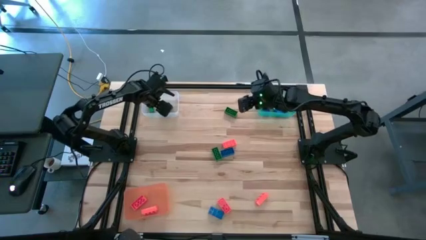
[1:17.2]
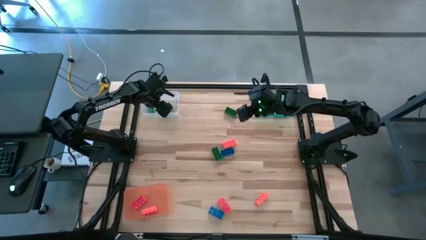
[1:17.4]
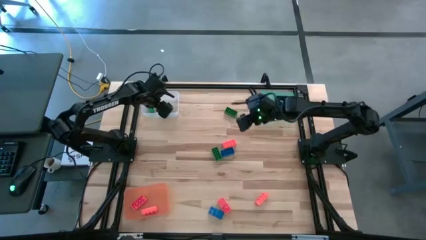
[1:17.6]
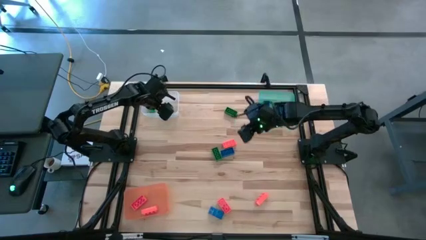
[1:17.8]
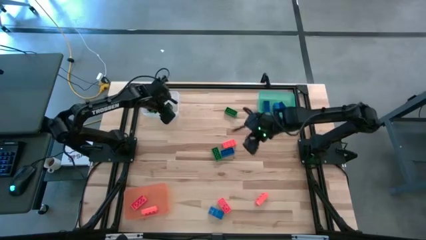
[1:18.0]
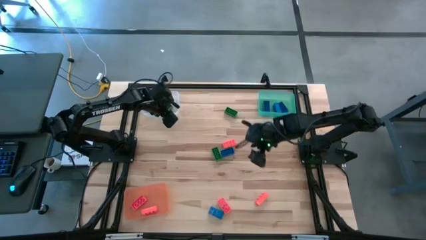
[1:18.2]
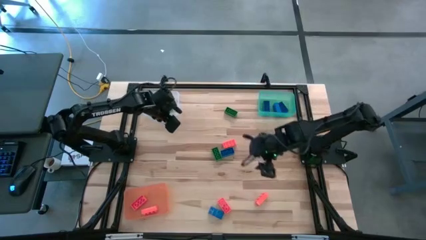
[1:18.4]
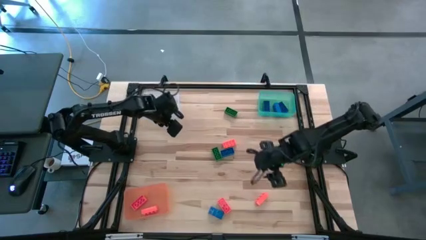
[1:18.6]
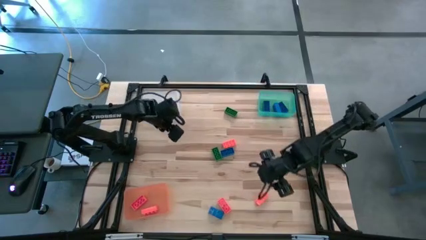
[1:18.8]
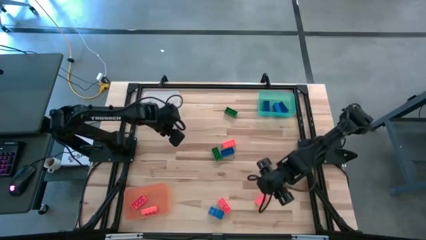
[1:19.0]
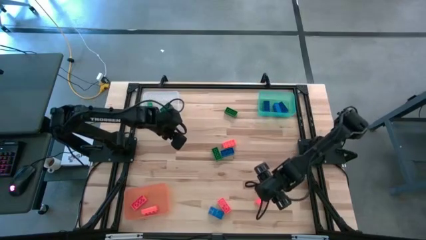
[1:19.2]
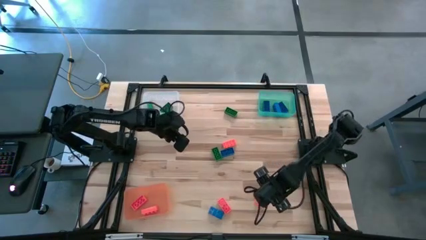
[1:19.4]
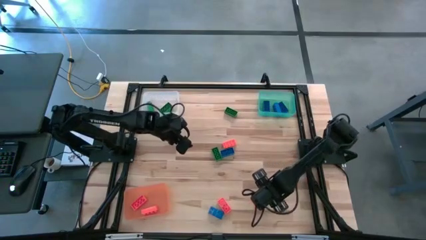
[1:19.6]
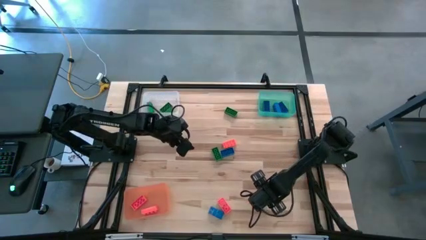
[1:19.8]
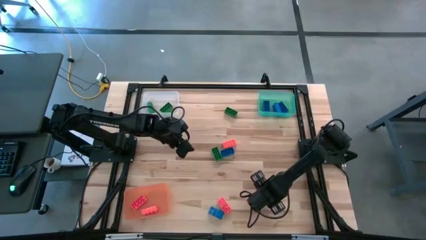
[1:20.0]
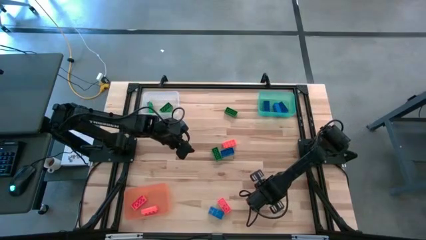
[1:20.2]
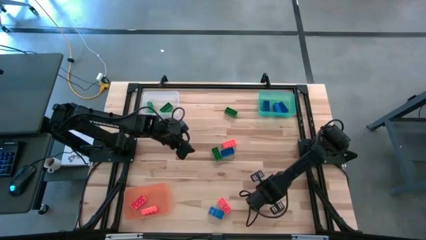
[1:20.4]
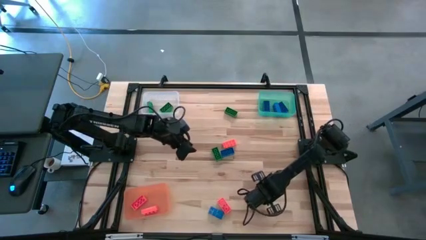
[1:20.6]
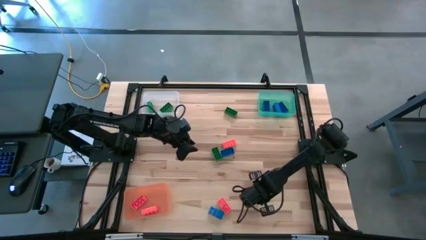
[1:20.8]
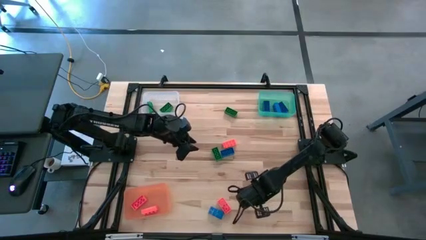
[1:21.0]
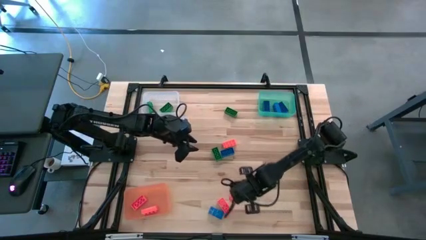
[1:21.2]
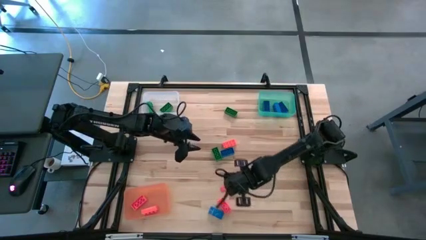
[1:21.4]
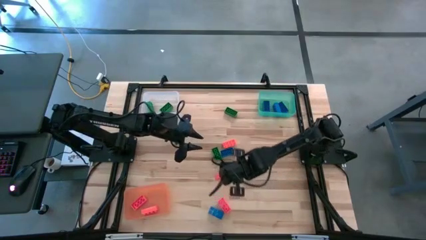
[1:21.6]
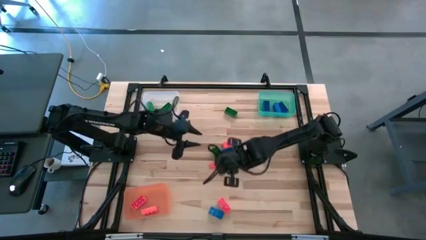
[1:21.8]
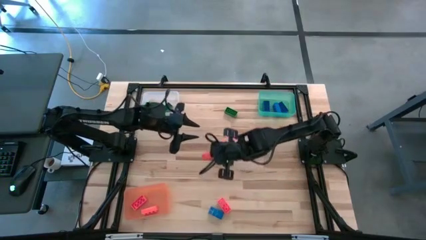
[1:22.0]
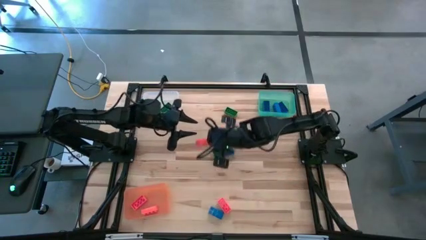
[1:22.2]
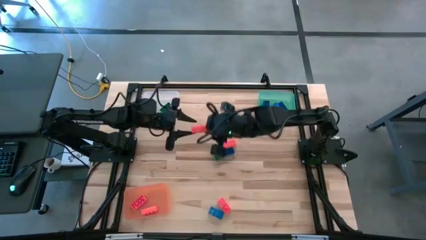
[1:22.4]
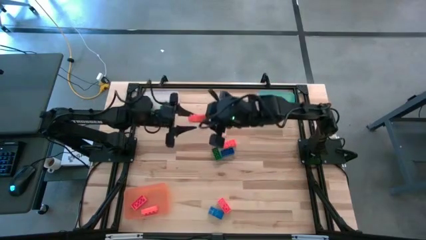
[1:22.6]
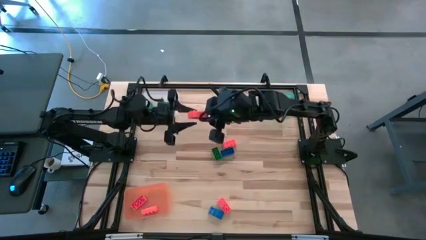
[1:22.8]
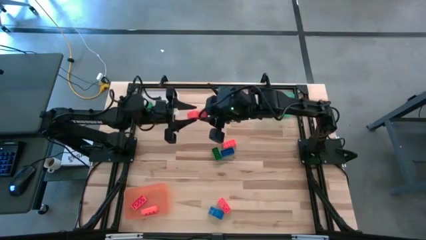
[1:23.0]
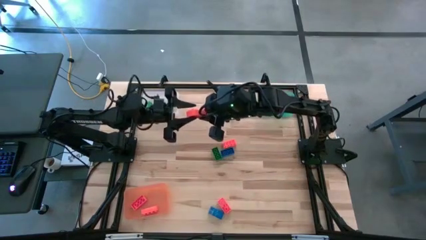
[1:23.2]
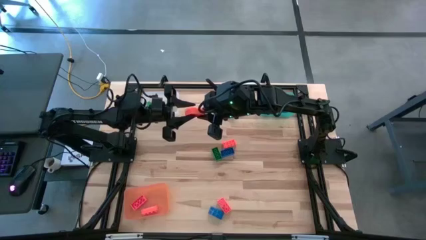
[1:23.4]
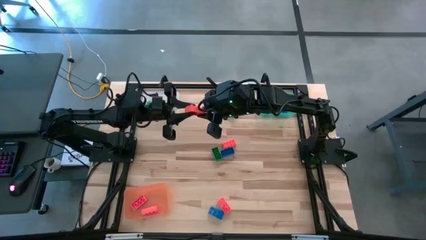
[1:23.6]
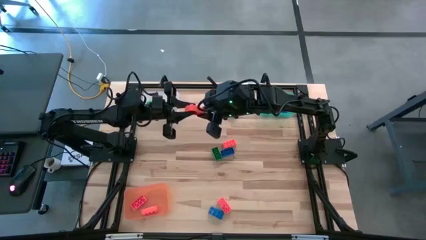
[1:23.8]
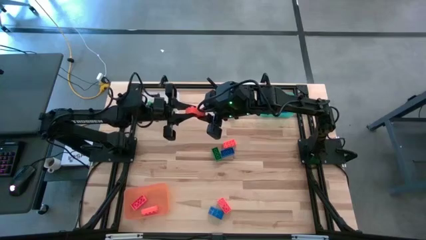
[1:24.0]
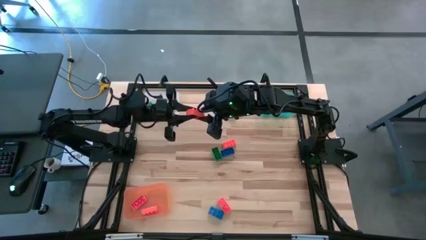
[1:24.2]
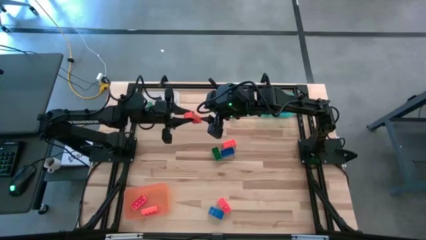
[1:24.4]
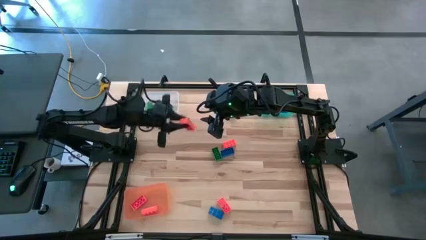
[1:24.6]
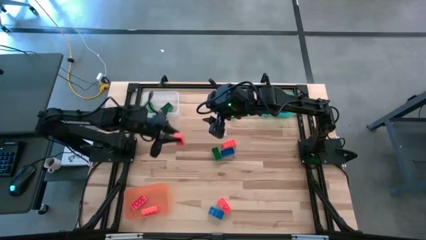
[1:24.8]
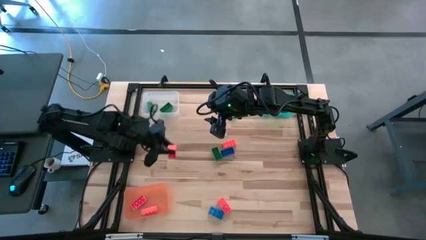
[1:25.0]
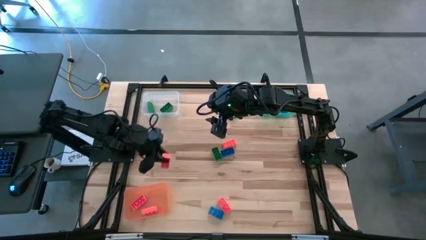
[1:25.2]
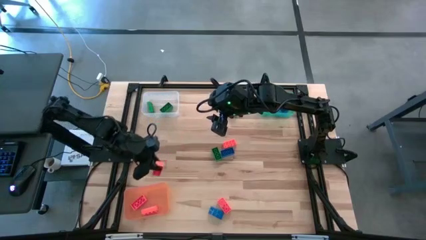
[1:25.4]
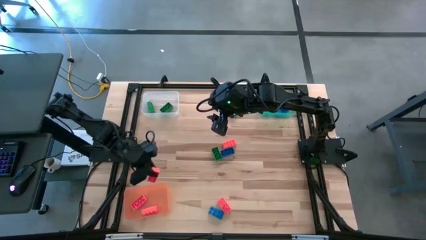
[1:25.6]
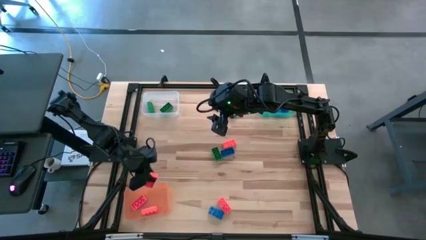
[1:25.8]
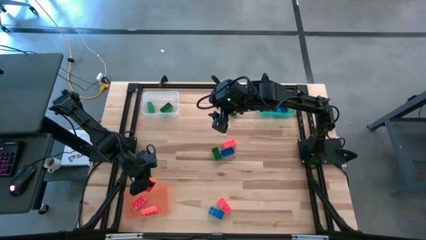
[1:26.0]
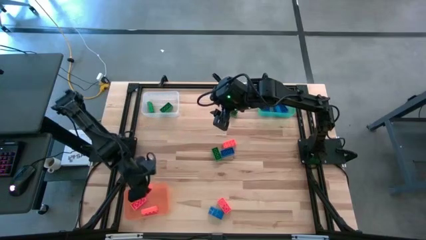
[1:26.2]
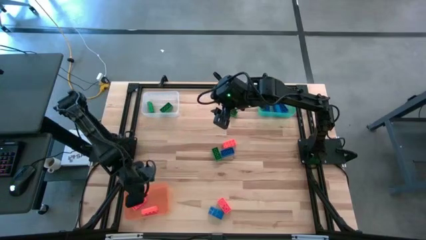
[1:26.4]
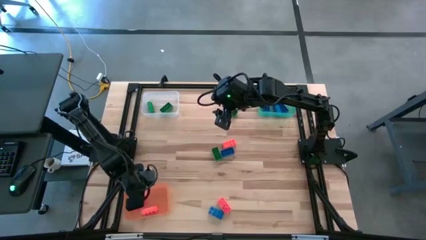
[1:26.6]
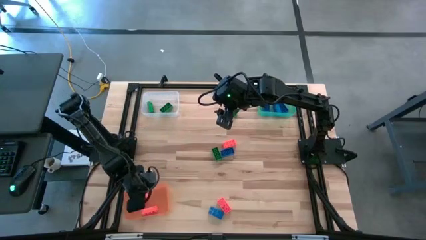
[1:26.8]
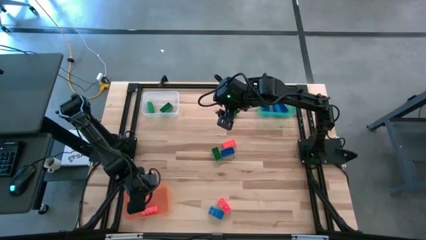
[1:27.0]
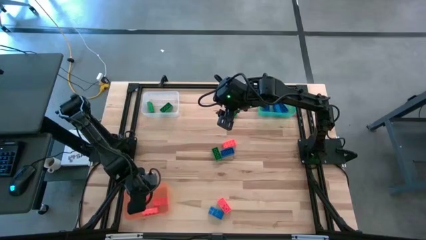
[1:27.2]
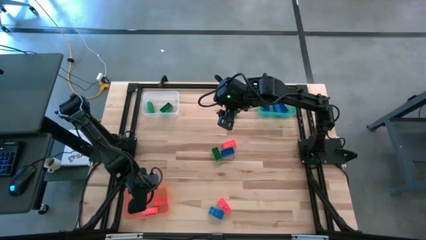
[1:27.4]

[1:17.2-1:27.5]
Task: Sort & place blocks by color
Put the orange game piece into the orange bin

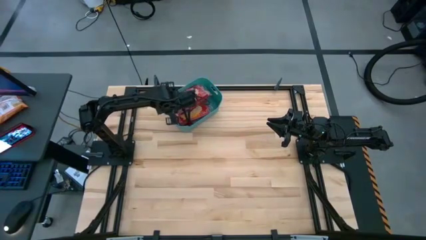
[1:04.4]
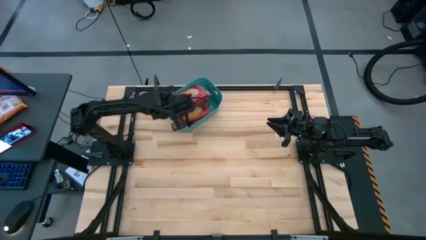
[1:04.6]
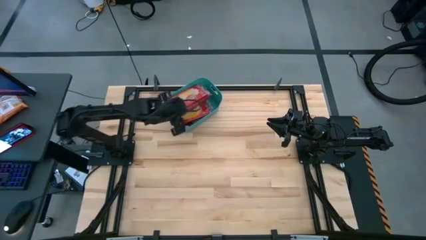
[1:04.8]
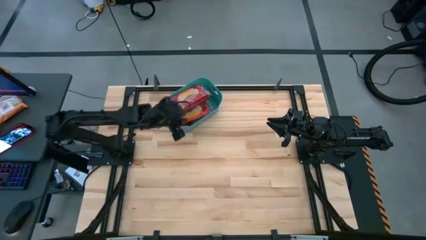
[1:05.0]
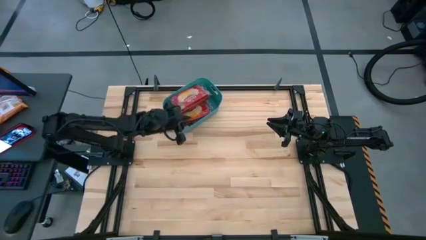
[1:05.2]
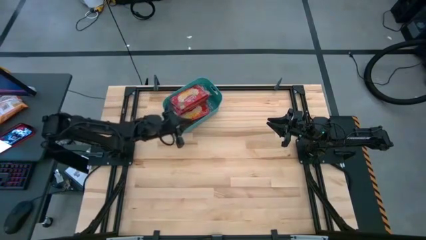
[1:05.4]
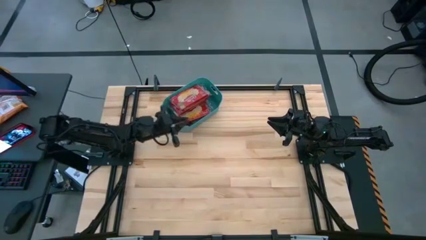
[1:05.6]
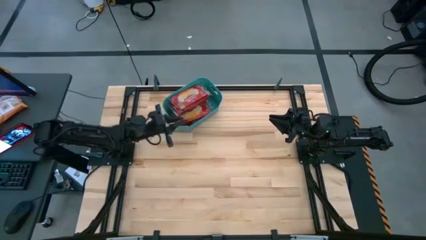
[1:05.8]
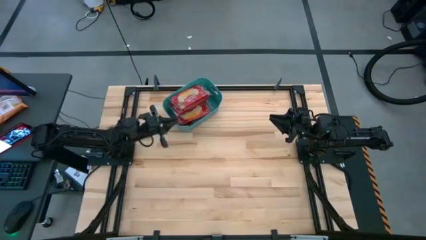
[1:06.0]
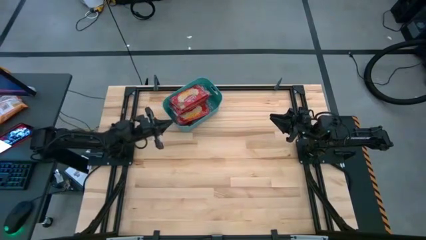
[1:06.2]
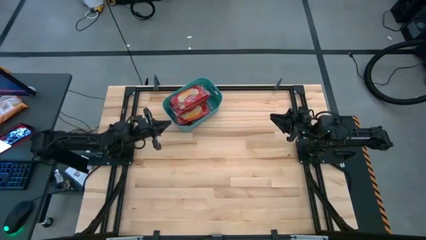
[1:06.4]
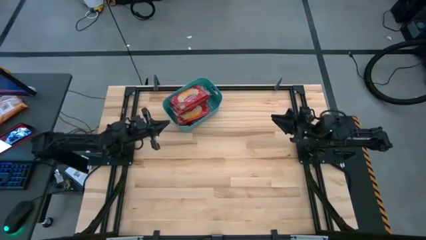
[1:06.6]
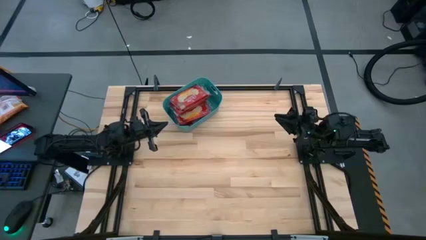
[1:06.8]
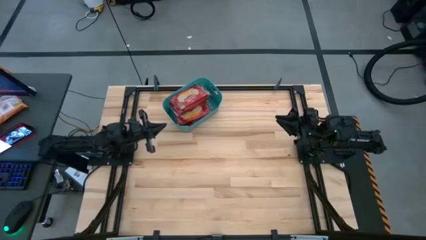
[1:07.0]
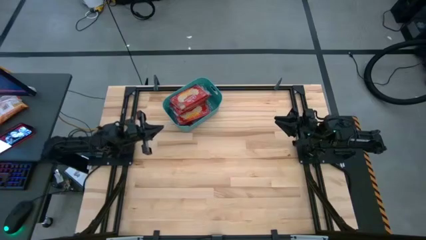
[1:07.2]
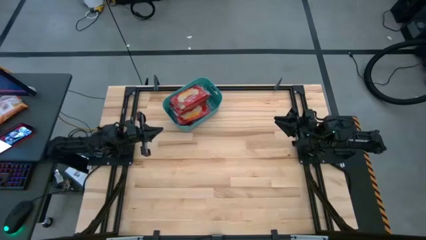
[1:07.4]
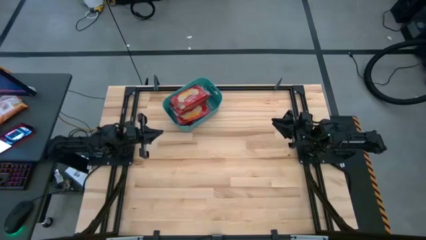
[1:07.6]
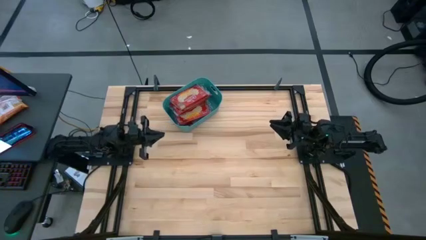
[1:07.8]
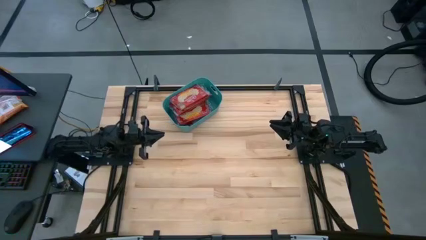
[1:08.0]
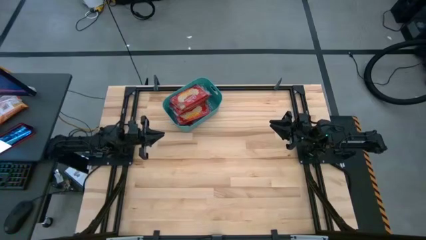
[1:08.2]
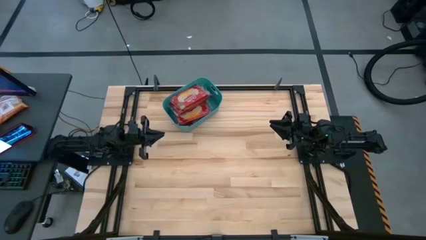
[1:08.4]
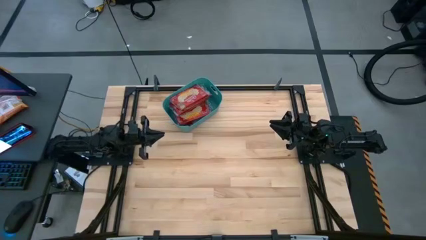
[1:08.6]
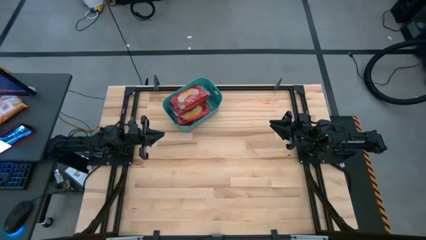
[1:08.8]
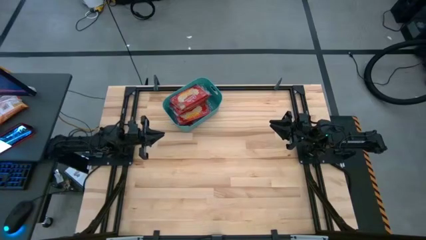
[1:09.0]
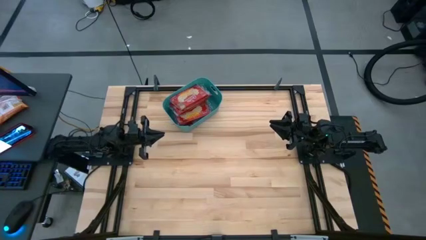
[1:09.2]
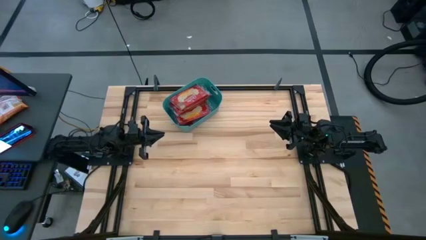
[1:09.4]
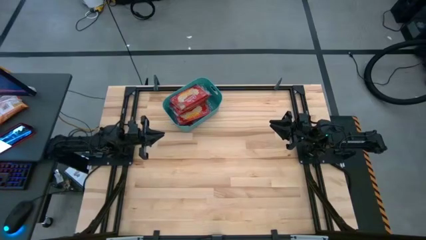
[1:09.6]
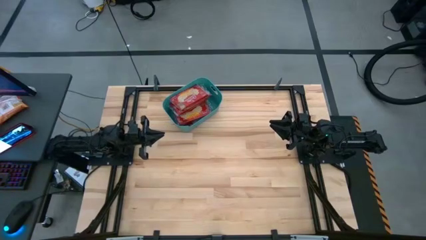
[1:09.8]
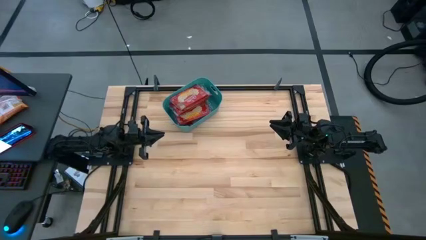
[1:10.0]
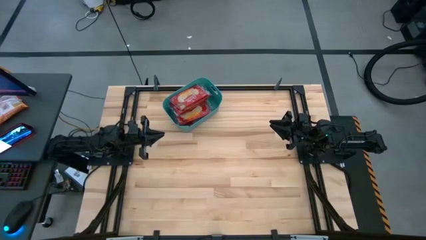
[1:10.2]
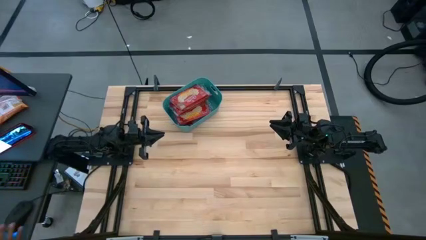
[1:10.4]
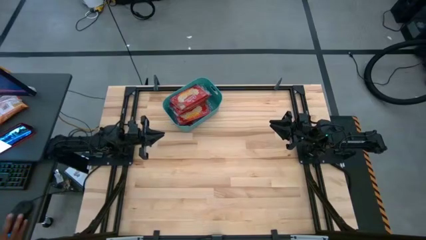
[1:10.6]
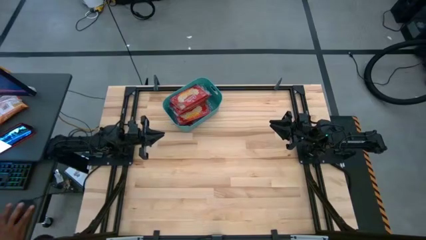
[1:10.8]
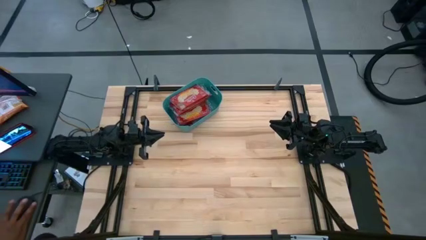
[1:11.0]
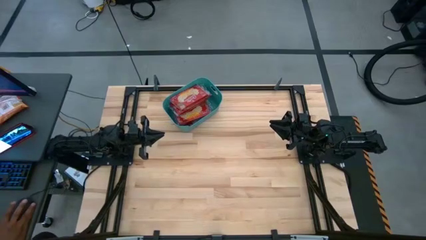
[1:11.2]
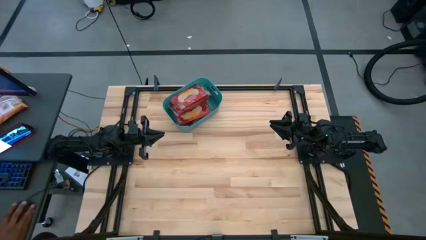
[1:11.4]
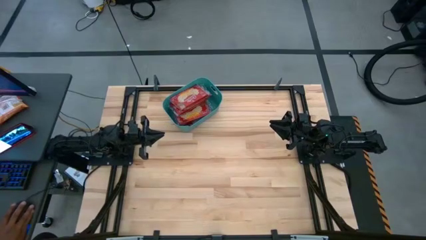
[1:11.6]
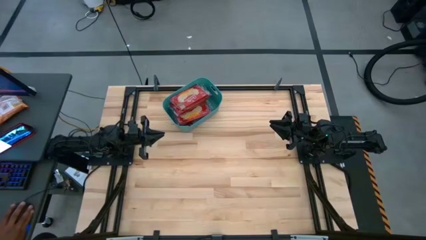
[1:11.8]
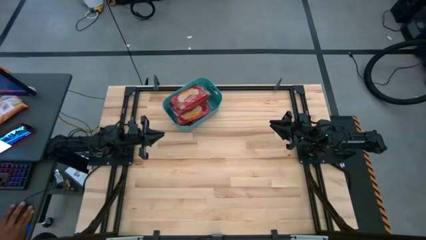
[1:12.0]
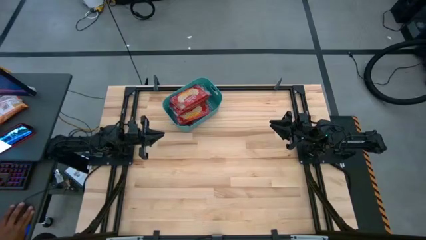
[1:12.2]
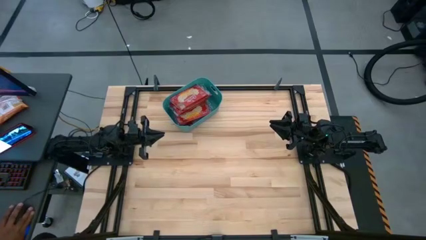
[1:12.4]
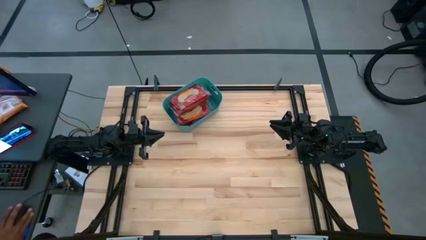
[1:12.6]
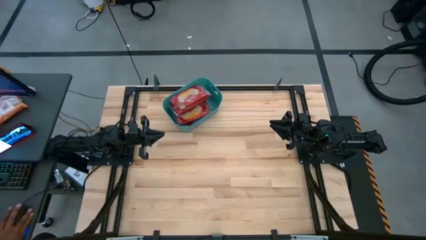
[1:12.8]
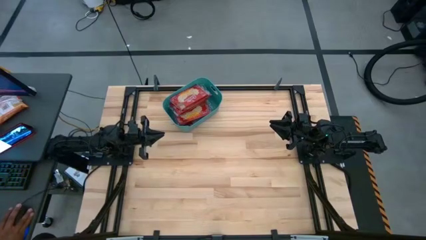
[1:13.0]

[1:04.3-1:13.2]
Task: Sort popcorn bags into baskets
Return to Home Position
